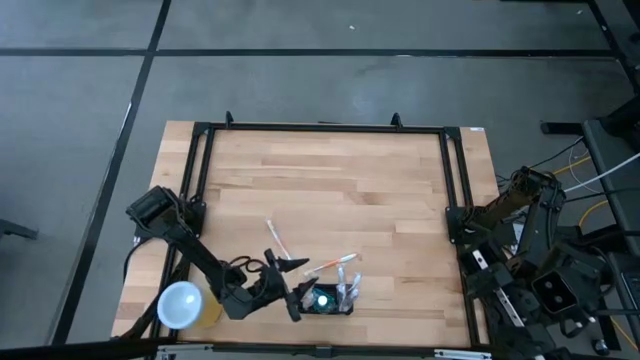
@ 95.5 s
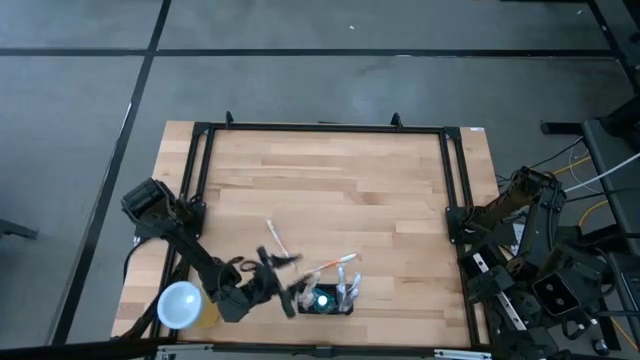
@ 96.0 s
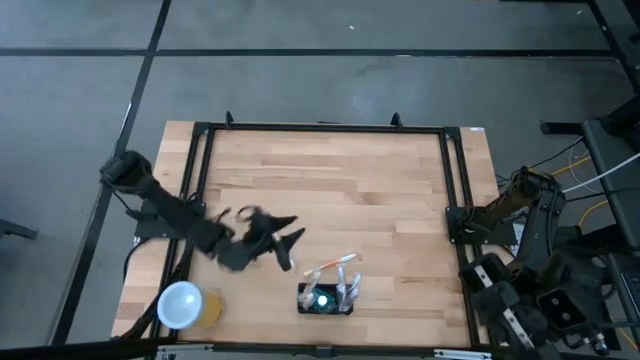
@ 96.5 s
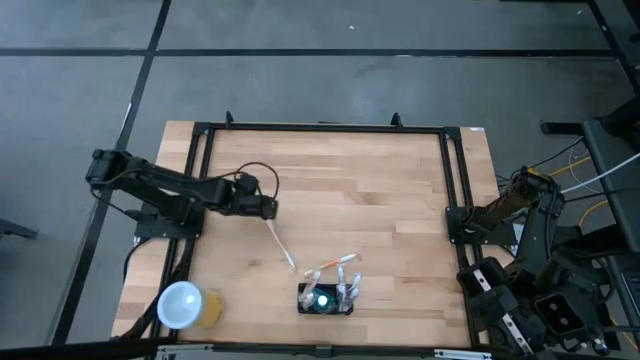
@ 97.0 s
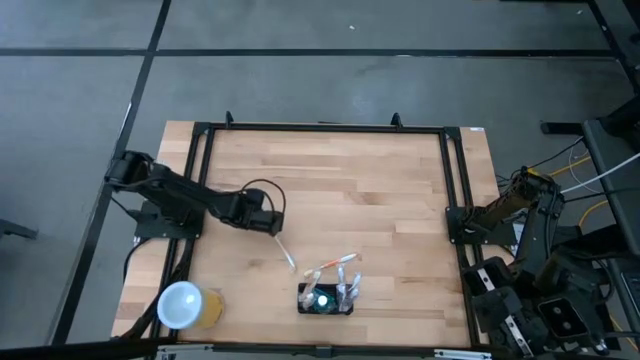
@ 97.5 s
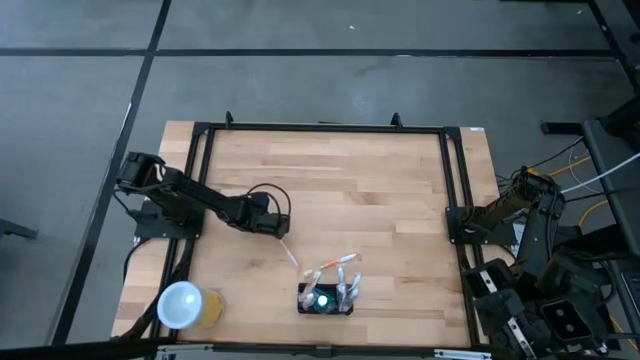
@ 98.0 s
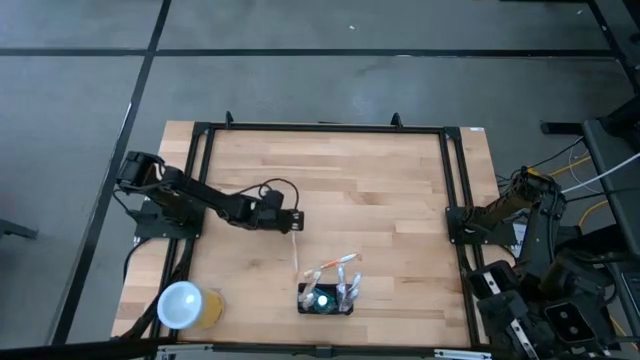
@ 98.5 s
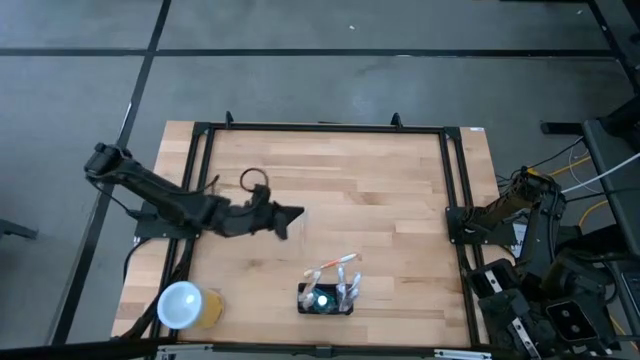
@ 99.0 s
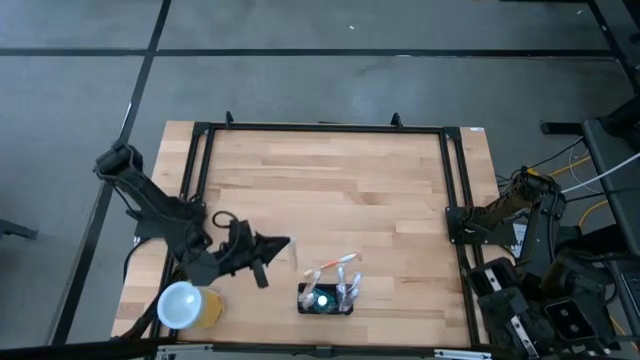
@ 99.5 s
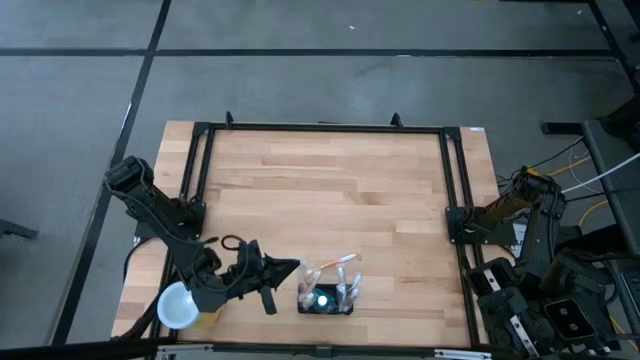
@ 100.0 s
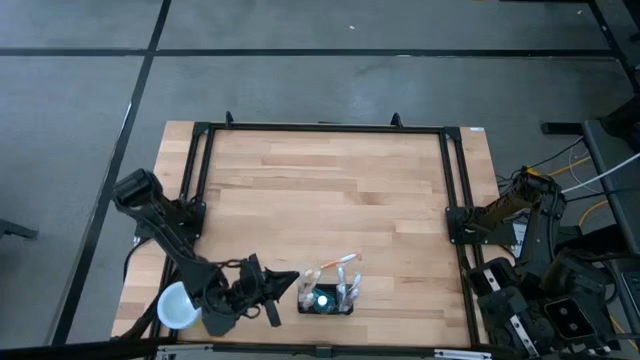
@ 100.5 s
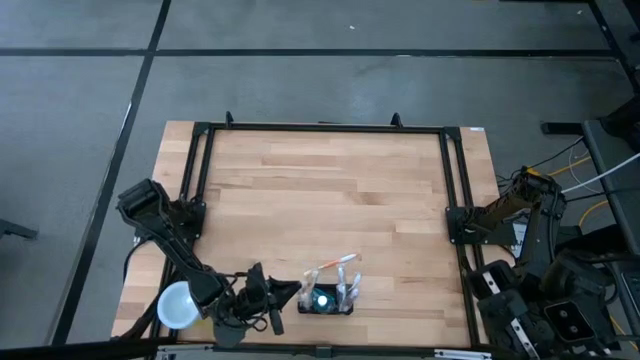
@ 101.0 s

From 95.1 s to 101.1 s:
Task: Pick & Place toothbrushing station
Put the orange toothbrush into the mesh organizer

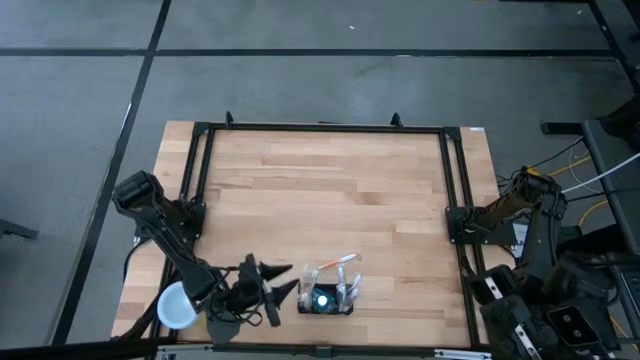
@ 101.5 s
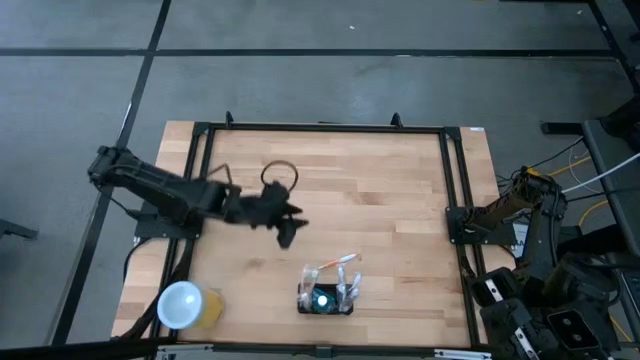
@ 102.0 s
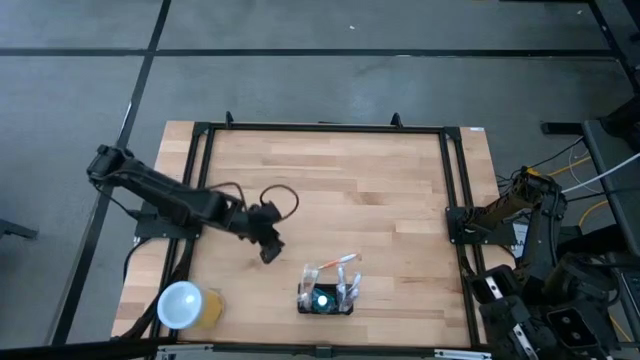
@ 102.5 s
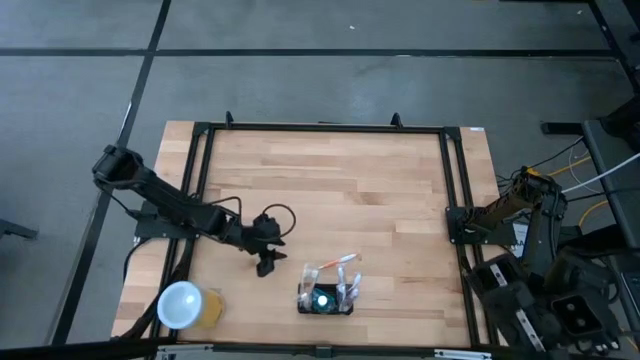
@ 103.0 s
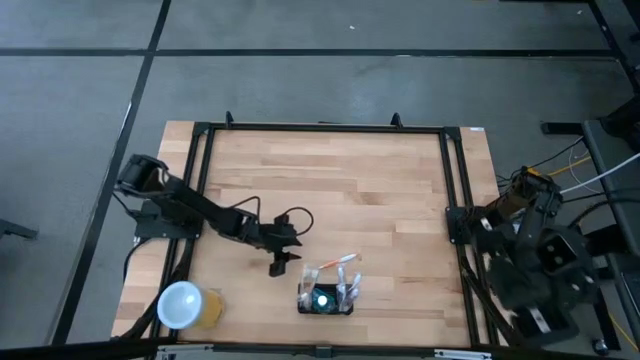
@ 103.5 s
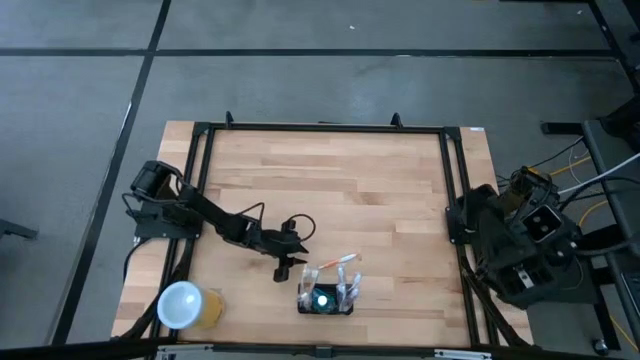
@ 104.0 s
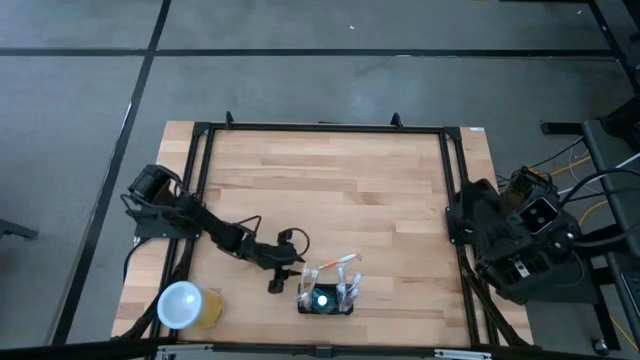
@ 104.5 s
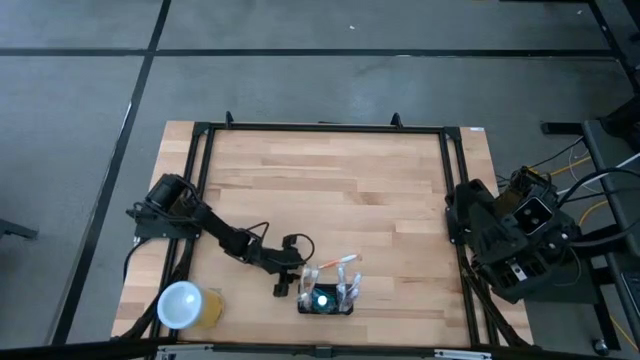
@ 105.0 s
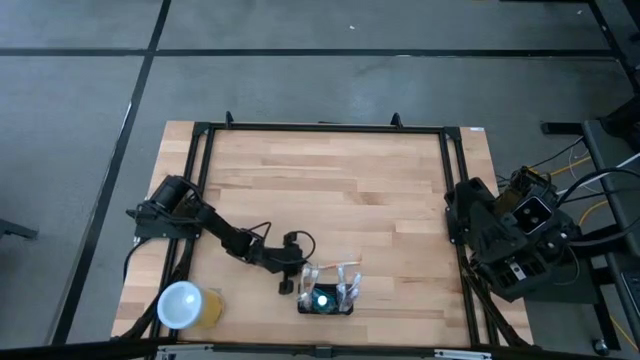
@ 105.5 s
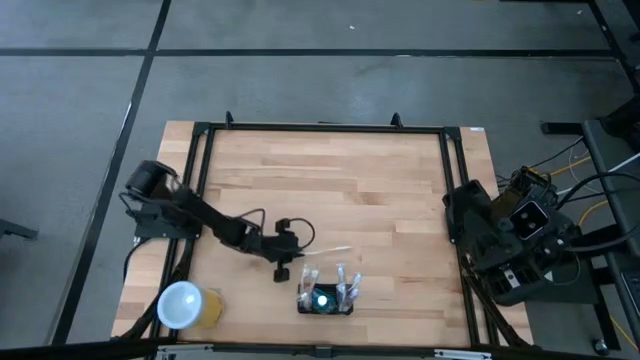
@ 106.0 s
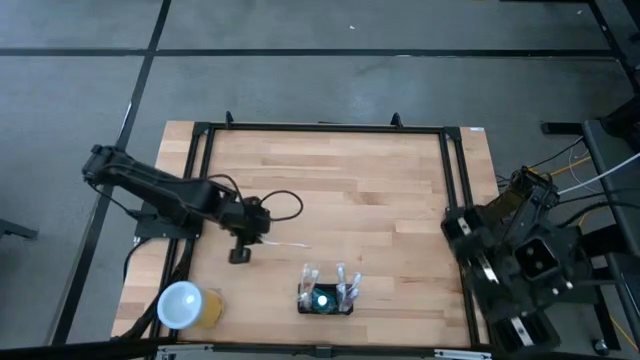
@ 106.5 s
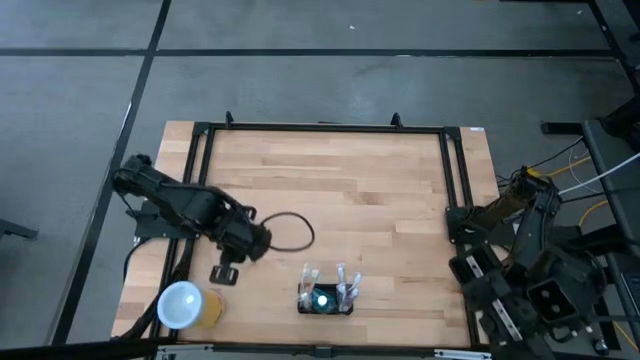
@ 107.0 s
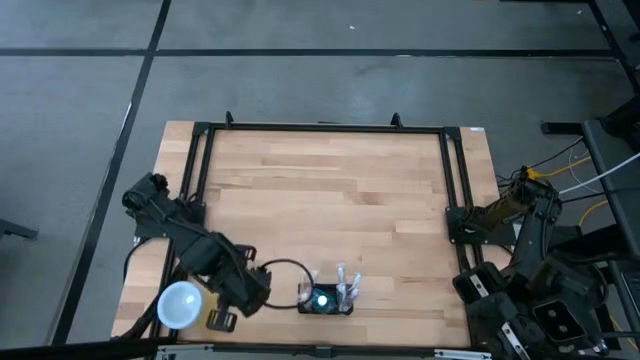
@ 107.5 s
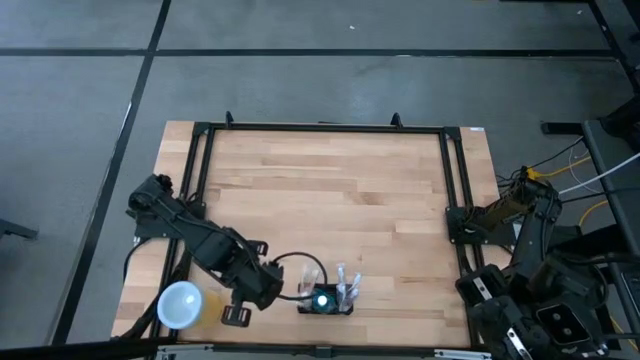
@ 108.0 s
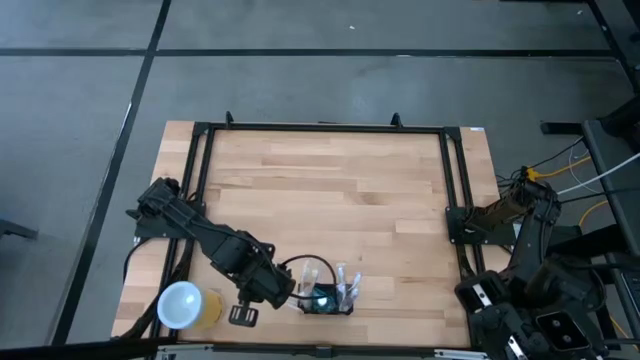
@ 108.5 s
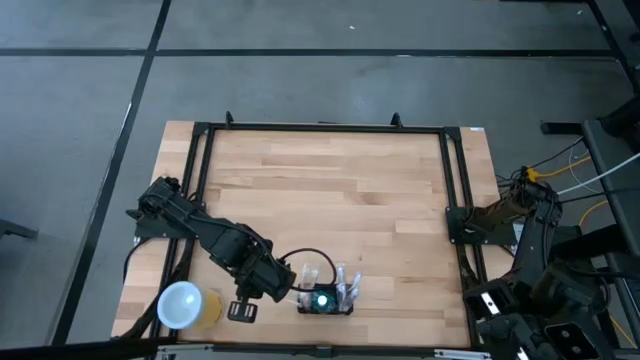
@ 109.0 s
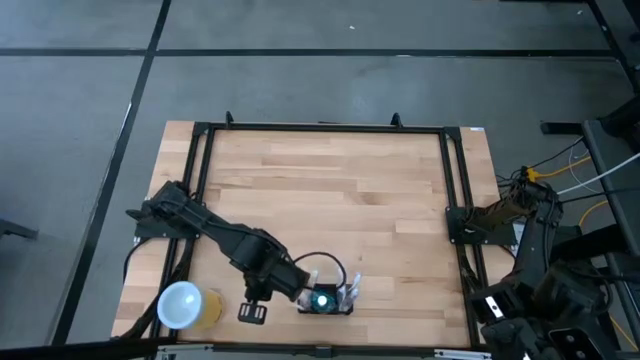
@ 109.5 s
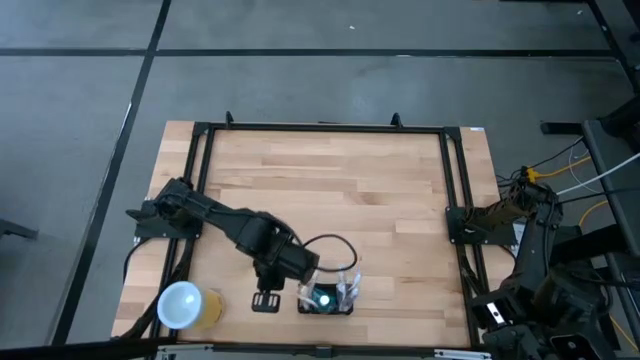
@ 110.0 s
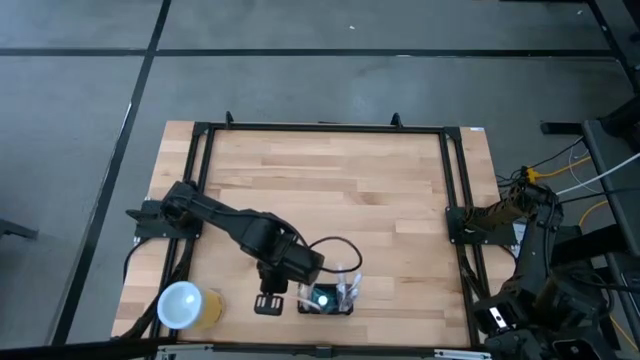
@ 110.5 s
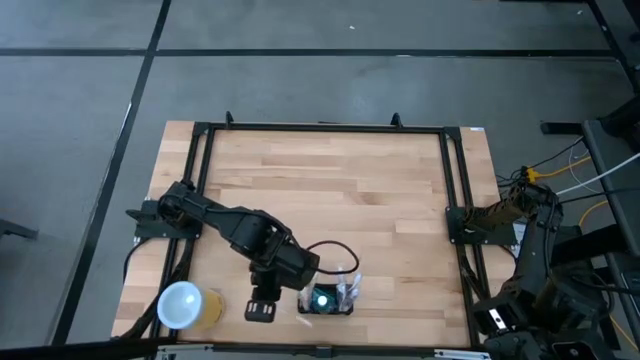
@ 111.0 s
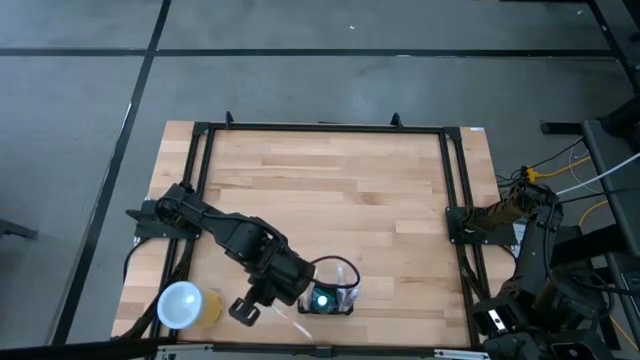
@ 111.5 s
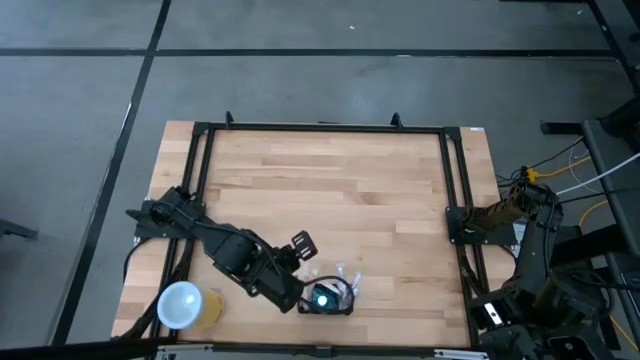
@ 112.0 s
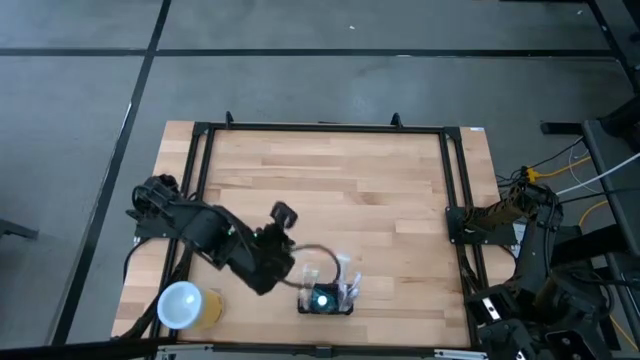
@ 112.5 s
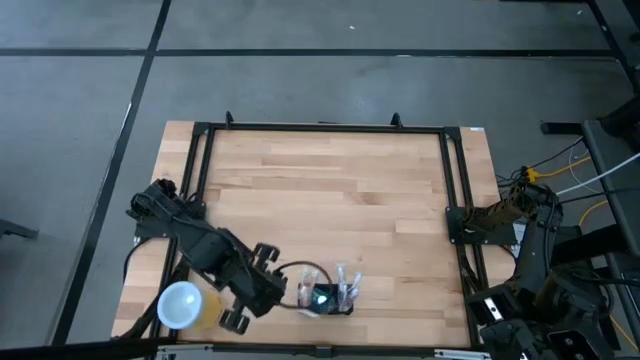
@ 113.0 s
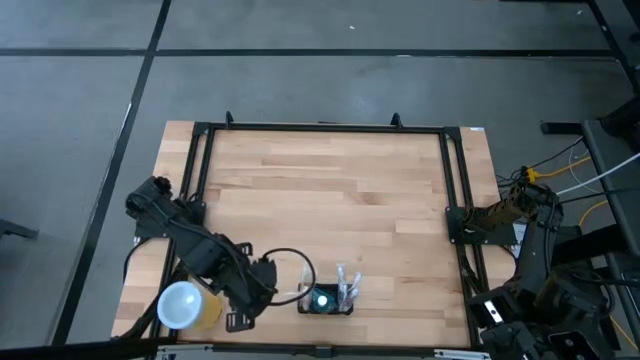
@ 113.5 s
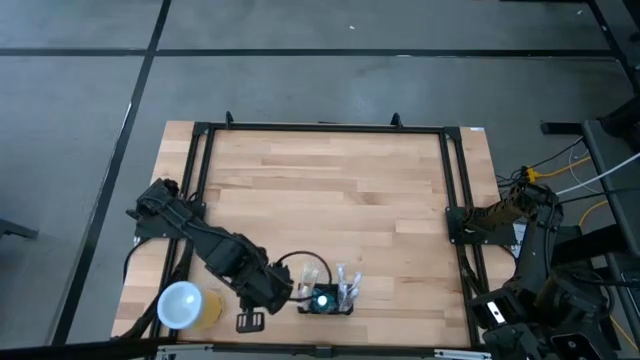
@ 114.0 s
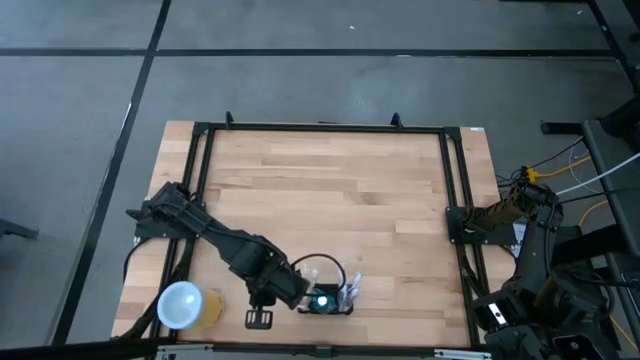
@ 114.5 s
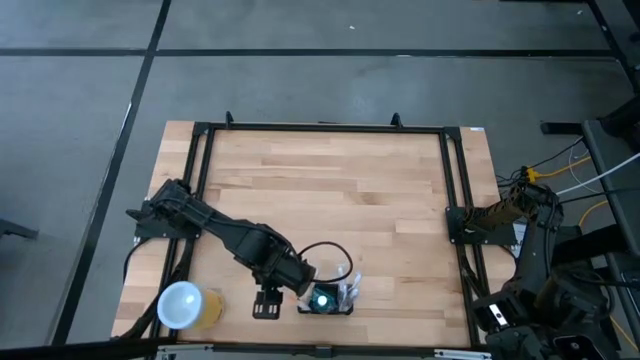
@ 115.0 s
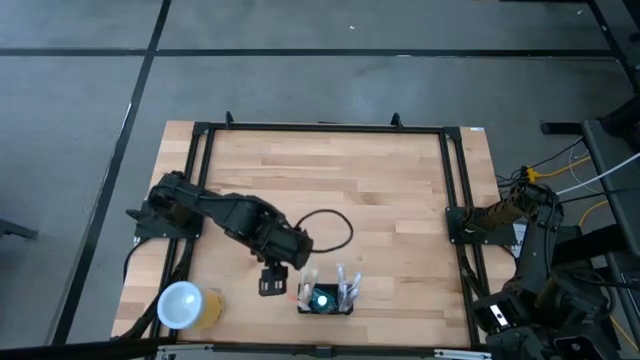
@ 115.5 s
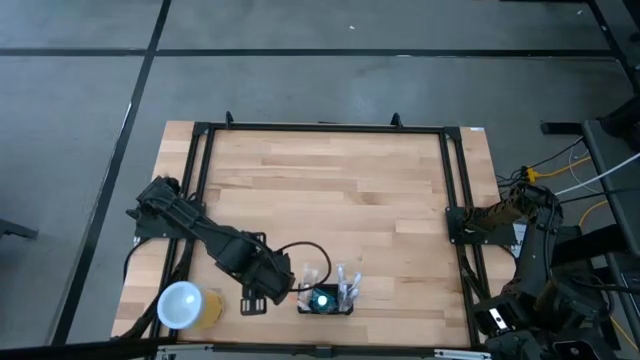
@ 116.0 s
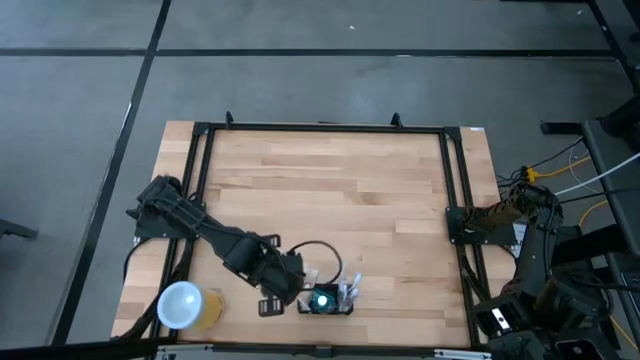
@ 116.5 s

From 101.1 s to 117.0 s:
Put the orange toothbrush into the mesh organizer
